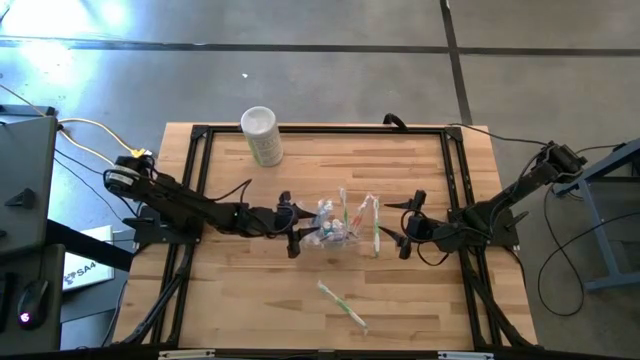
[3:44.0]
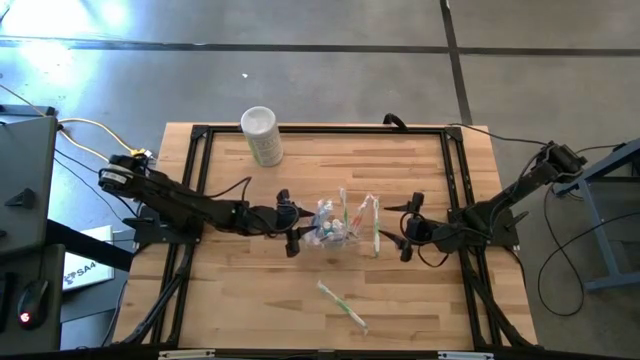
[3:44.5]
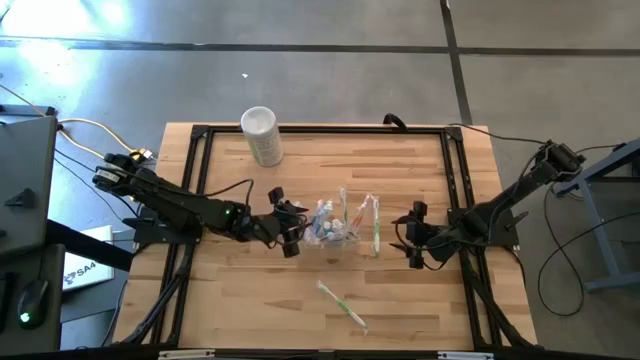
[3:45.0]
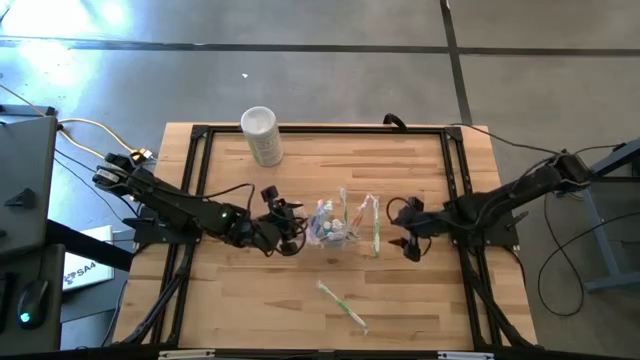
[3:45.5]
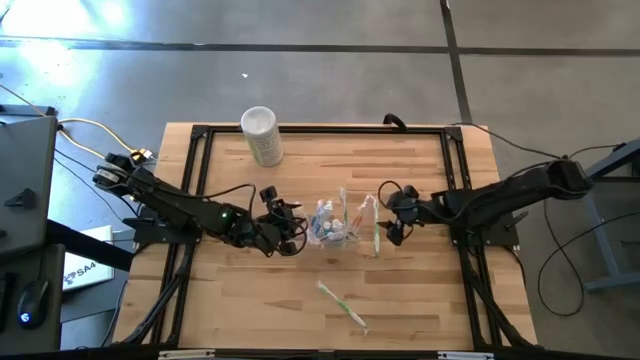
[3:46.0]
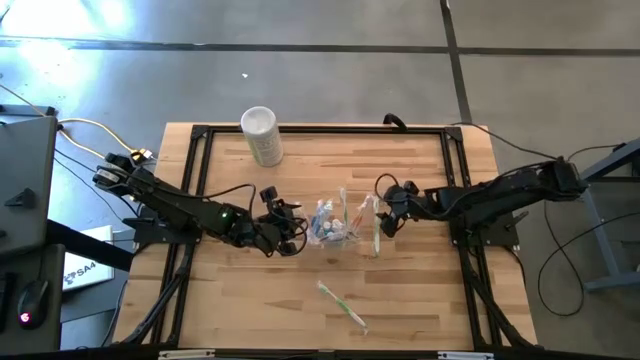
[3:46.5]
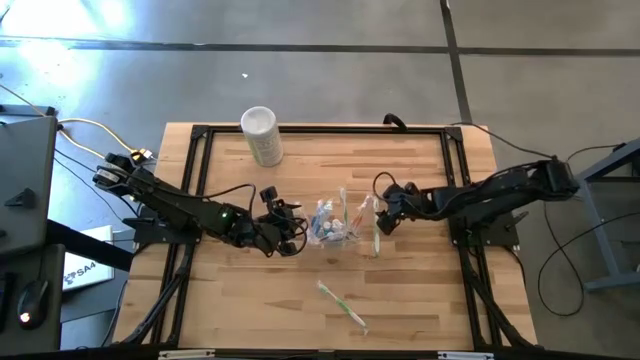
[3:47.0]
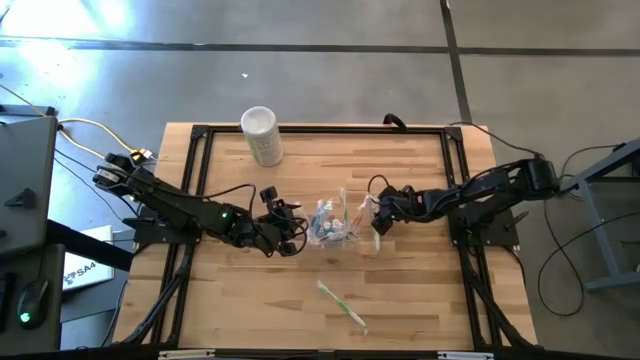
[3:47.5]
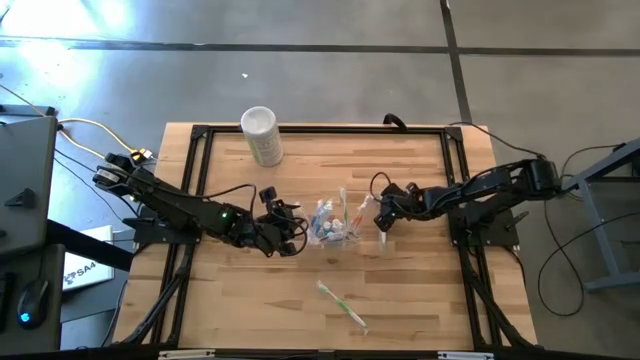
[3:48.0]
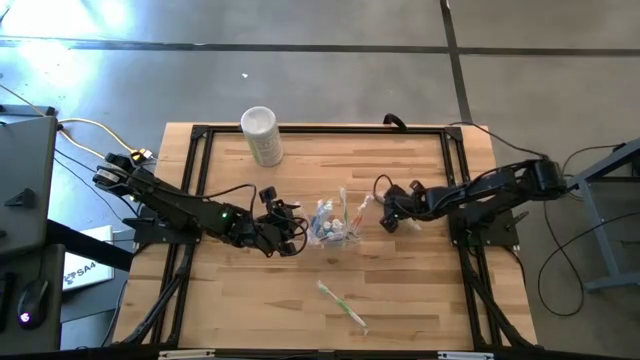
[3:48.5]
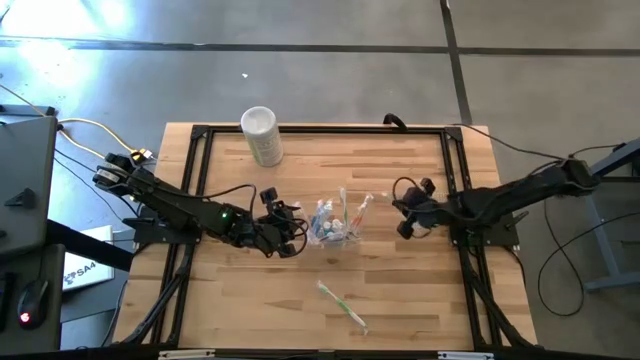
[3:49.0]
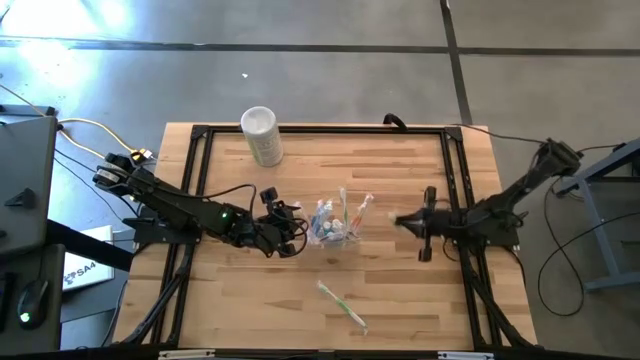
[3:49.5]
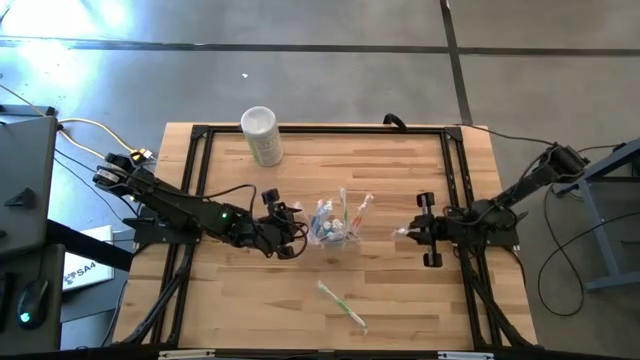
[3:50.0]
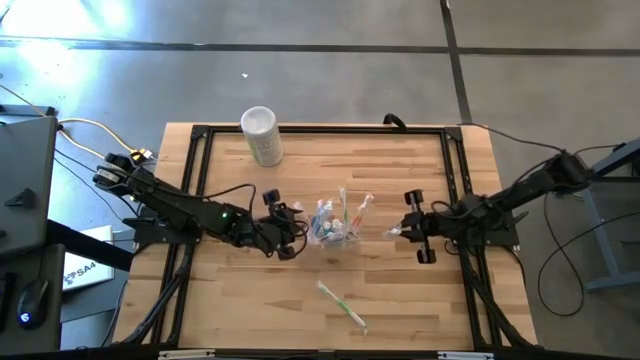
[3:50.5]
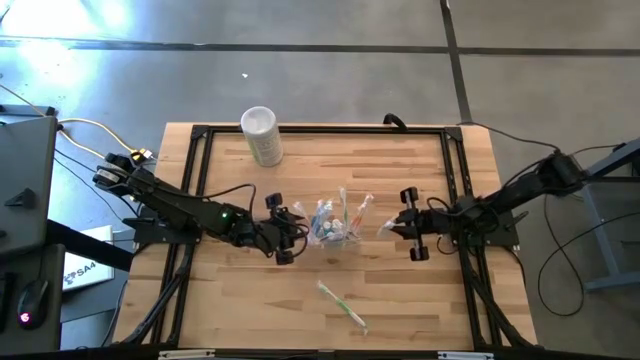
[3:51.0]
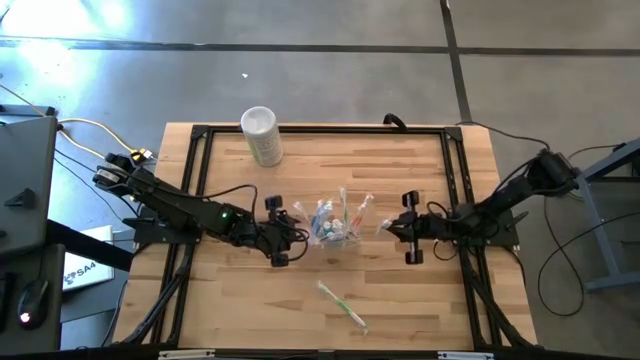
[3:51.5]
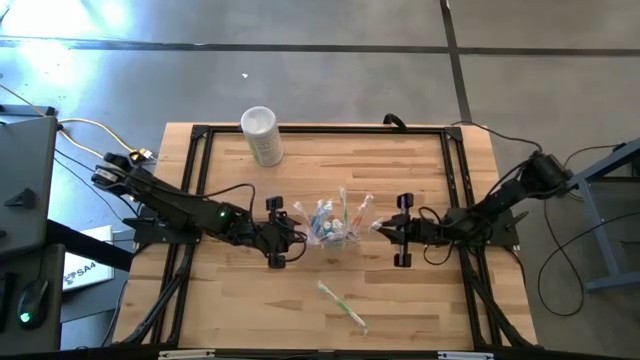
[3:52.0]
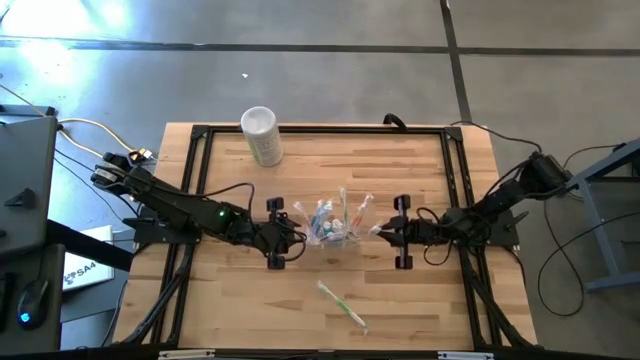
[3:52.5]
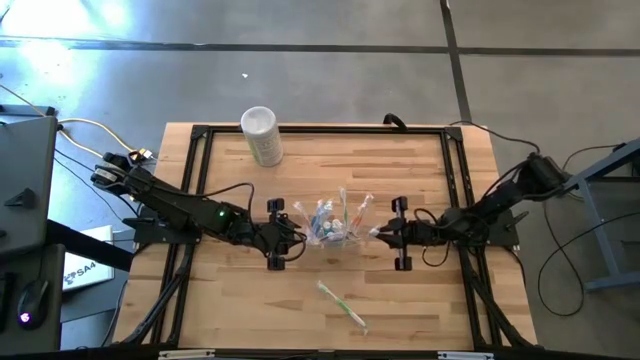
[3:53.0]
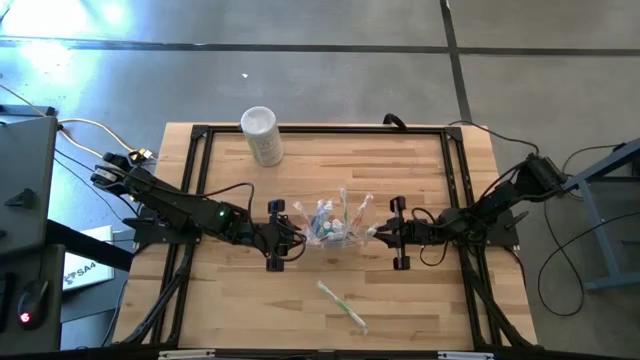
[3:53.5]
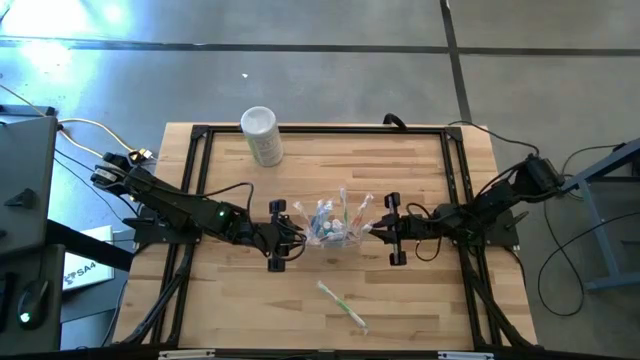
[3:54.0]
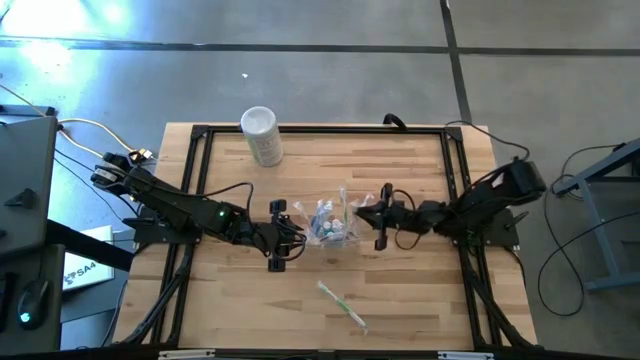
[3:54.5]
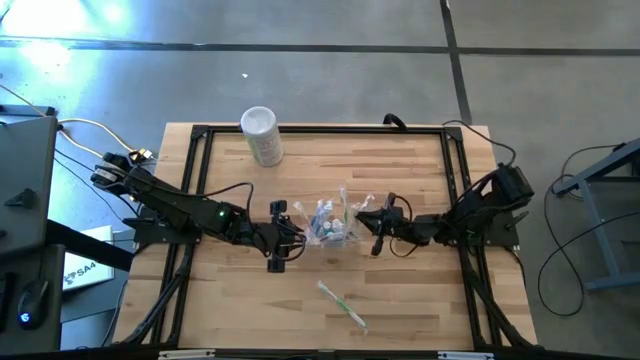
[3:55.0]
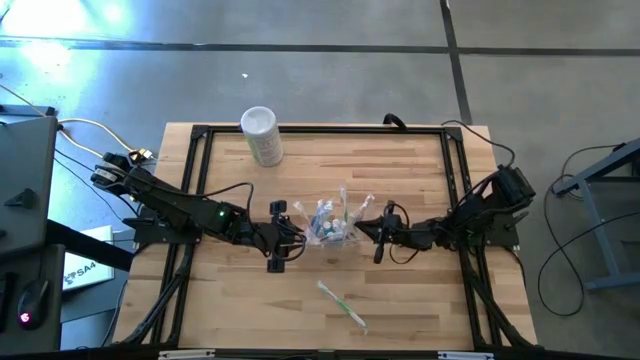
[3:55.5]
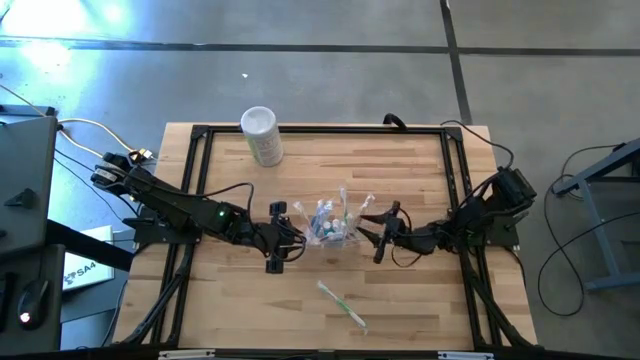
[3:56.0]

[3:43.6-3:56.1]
Task: Pick & Place toothbrushing station
Put the green toothbrush into the right section of the transparent organizer

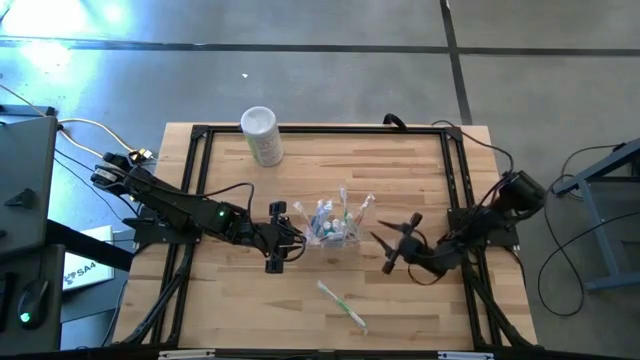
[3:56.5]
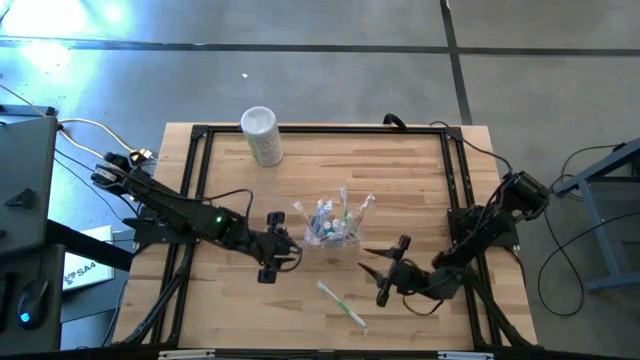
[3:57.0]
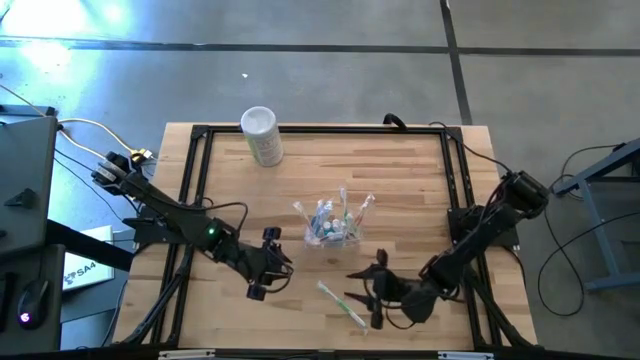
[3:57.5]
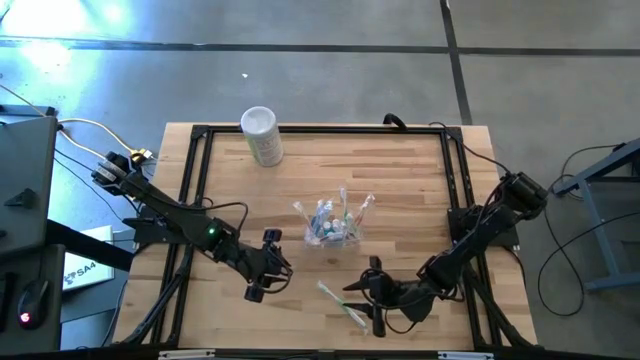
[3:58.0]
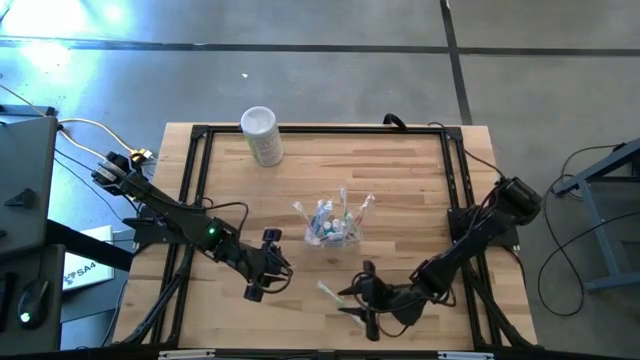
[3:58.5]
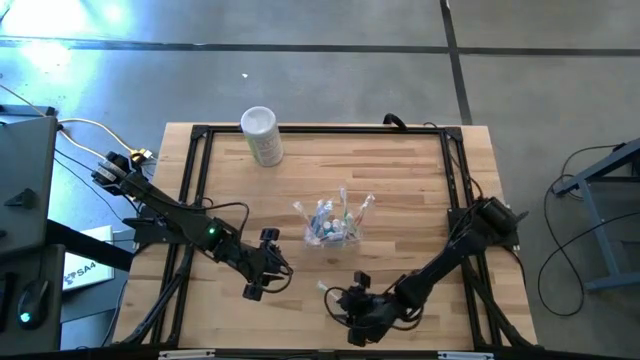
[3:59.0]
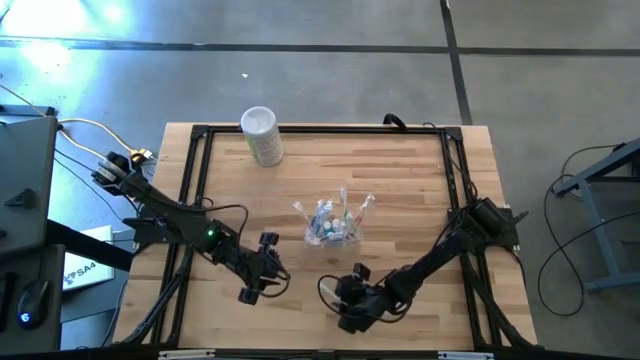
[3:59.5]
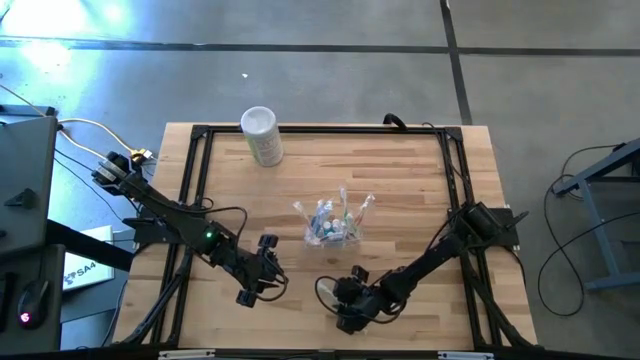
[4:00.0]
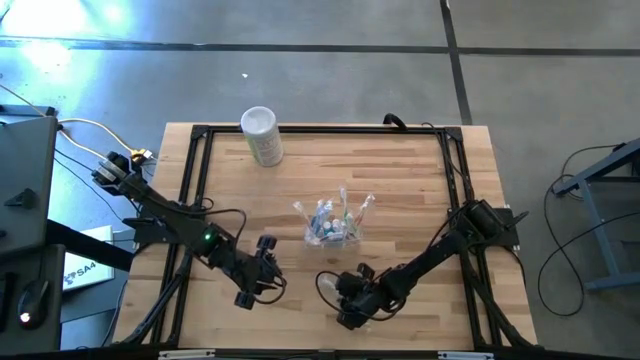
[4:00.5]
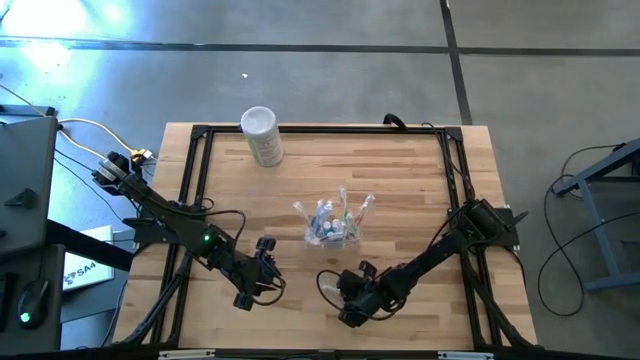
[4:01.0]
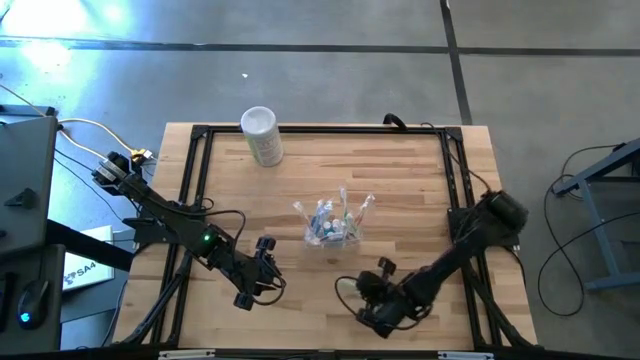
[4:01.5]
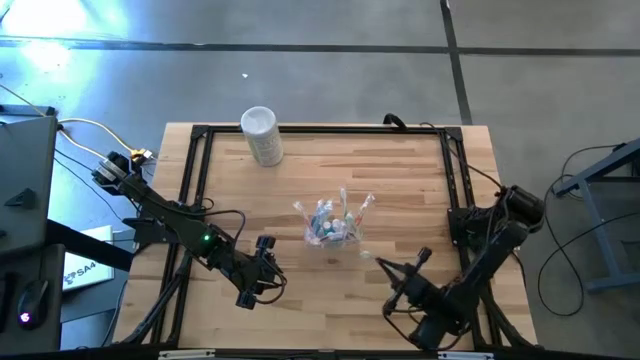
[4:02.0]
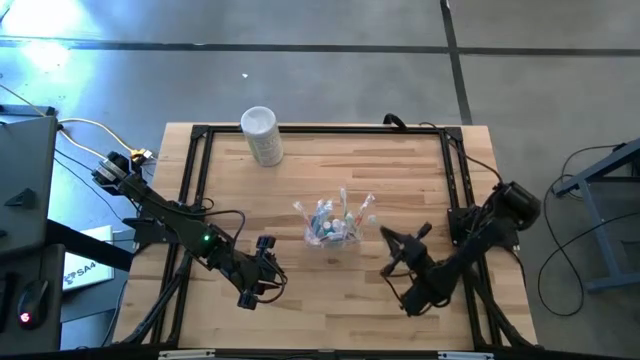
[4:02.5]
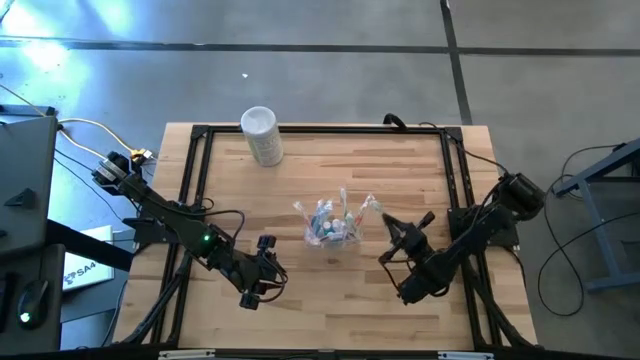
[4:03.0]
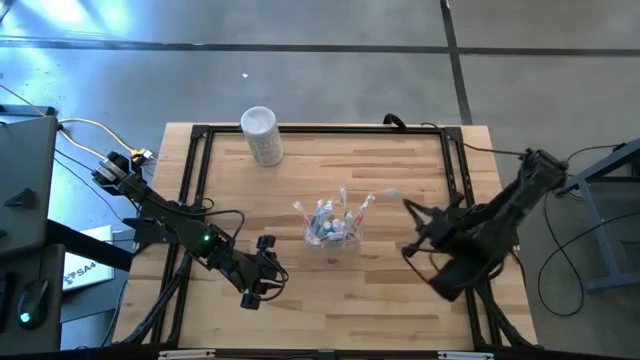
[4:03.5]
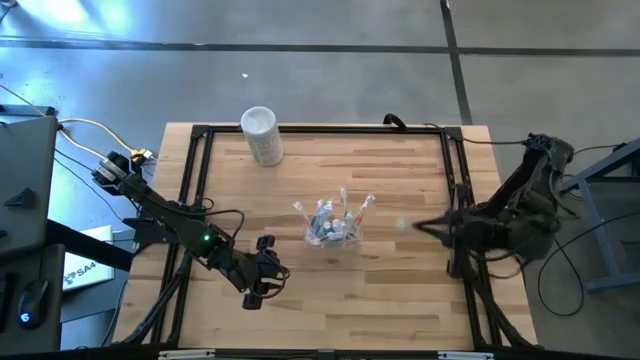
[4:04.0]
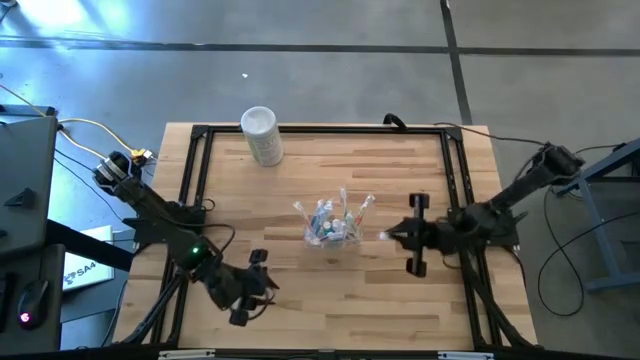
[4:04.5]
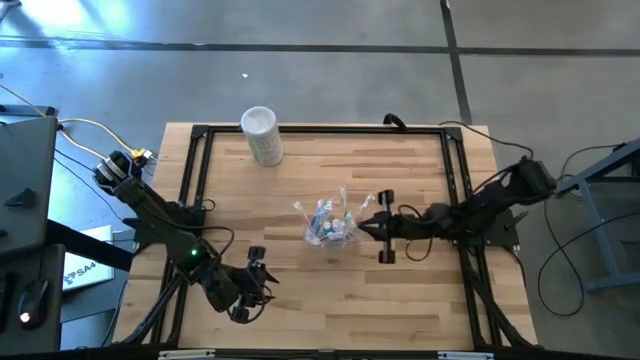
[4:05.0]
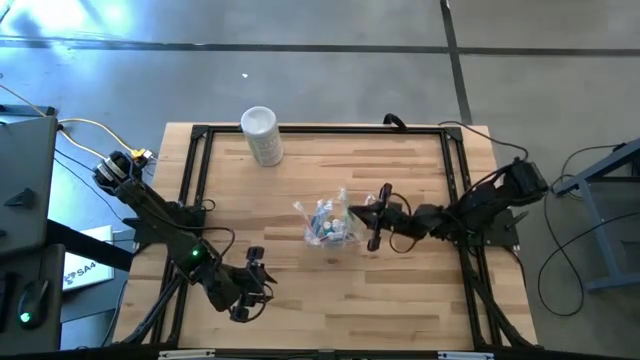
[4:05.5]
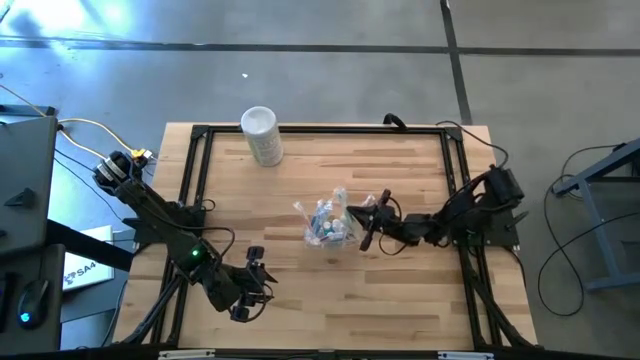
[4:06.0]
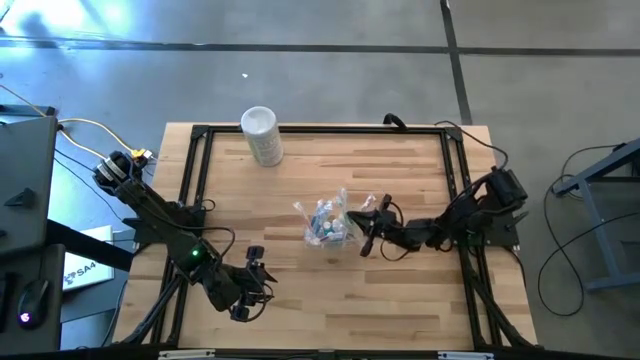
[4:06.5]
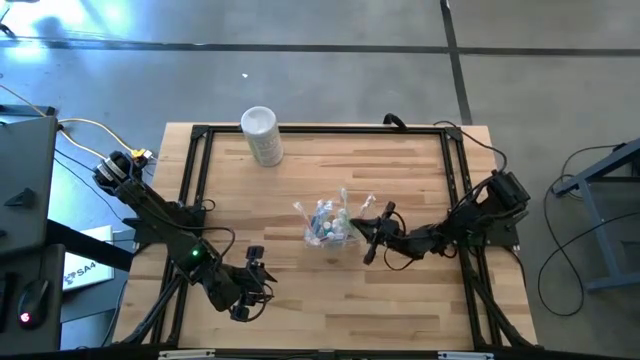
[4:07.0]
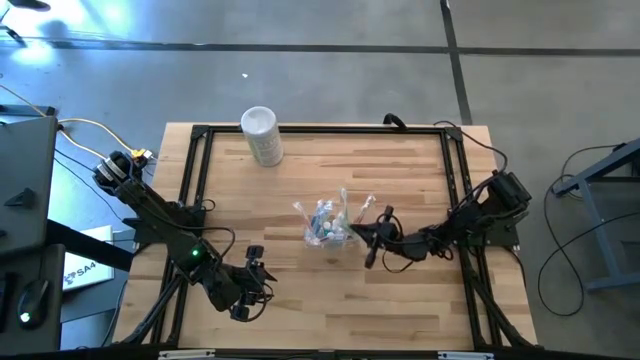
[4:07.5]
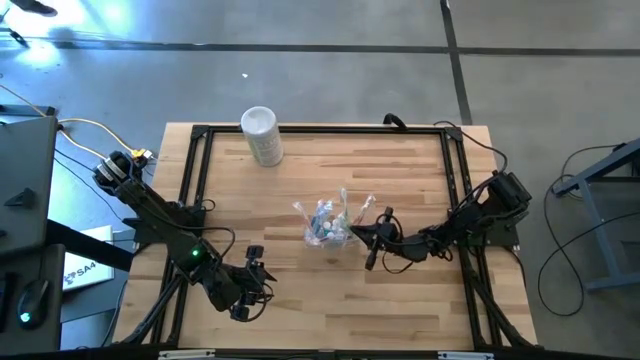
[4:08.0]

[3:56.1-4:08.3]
Put the green toothbrush into the right section of the transparent organizer
